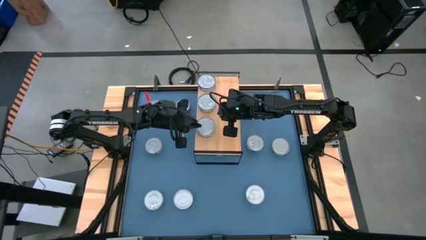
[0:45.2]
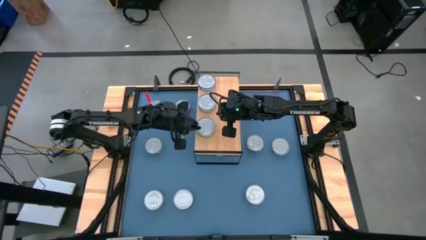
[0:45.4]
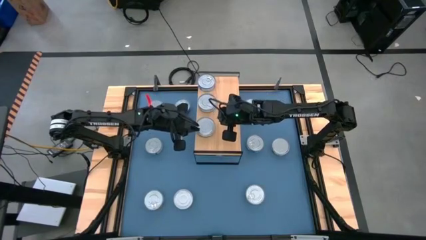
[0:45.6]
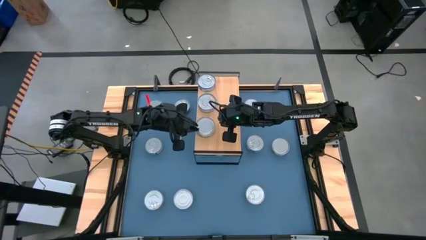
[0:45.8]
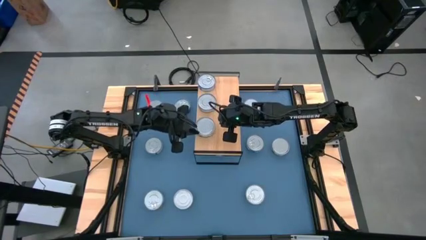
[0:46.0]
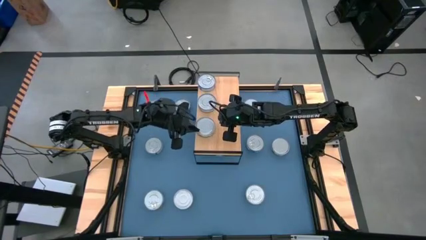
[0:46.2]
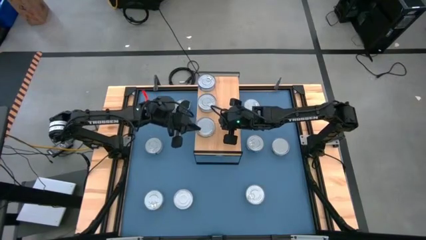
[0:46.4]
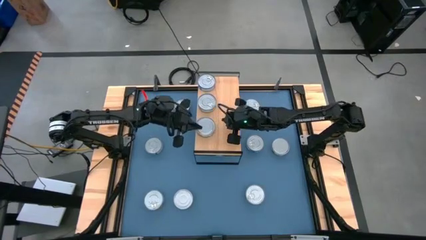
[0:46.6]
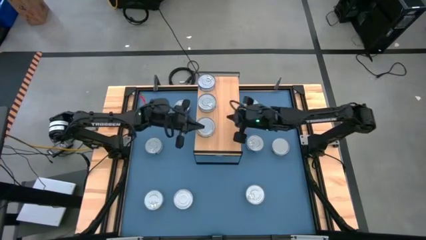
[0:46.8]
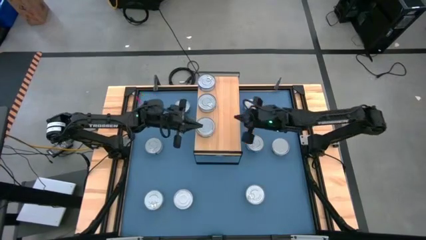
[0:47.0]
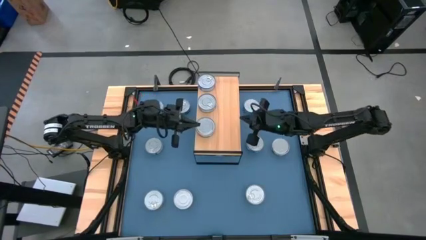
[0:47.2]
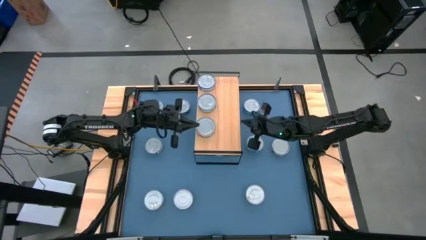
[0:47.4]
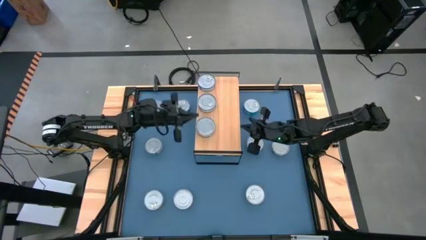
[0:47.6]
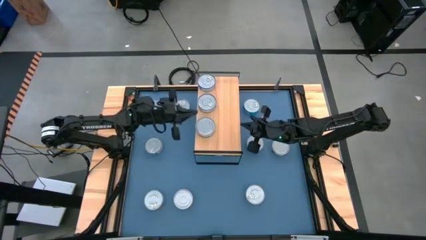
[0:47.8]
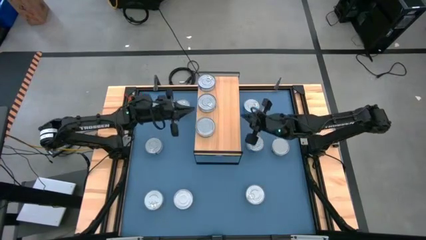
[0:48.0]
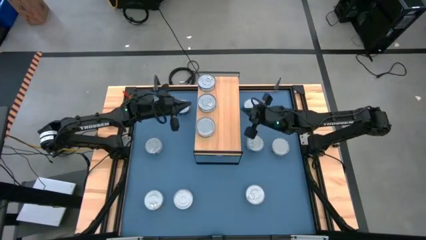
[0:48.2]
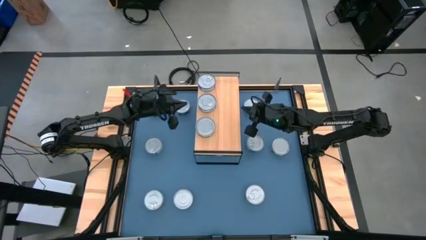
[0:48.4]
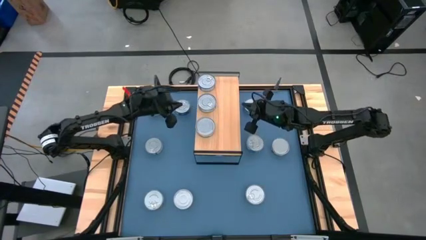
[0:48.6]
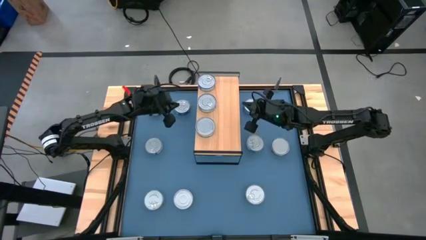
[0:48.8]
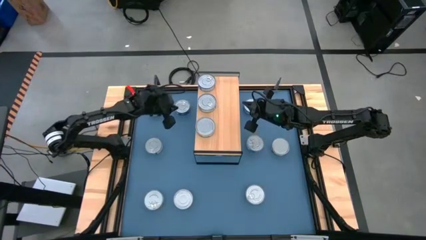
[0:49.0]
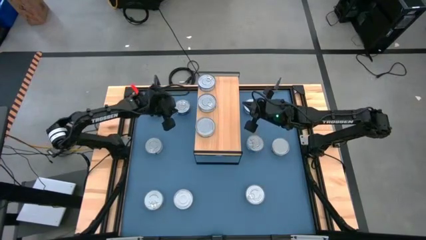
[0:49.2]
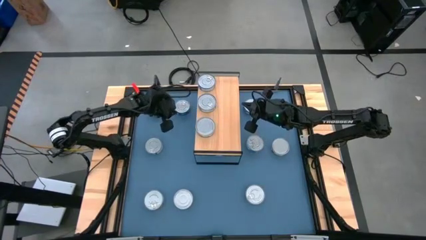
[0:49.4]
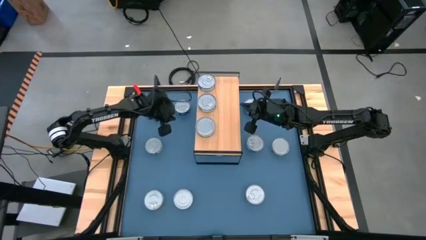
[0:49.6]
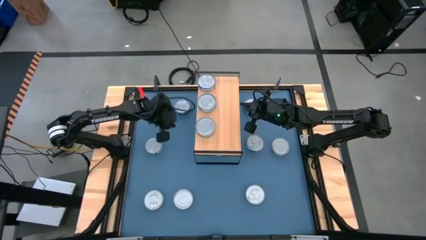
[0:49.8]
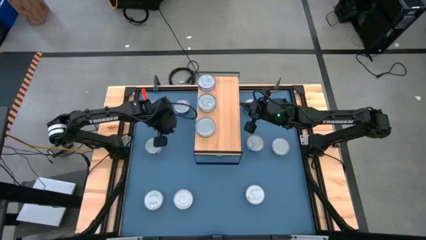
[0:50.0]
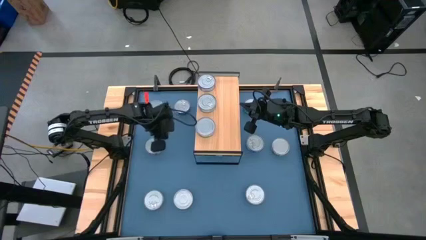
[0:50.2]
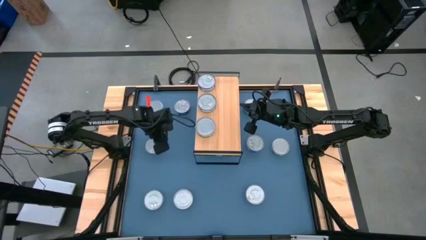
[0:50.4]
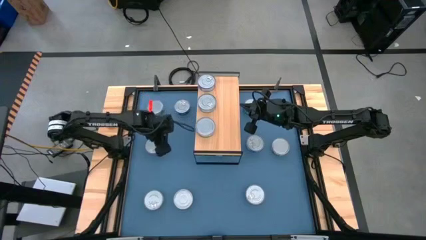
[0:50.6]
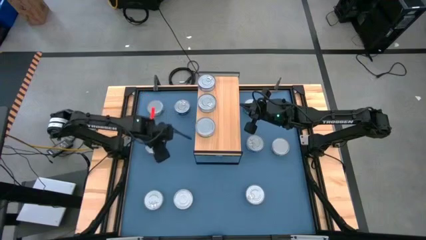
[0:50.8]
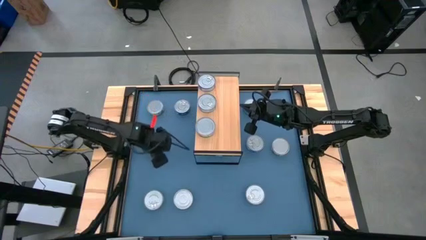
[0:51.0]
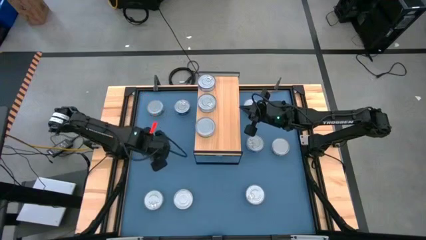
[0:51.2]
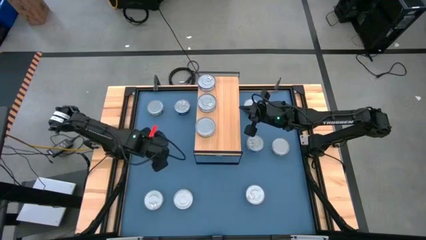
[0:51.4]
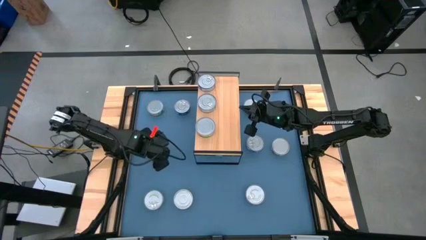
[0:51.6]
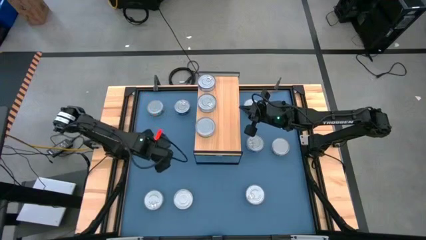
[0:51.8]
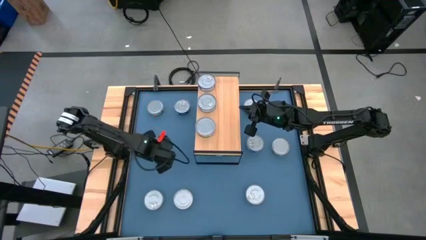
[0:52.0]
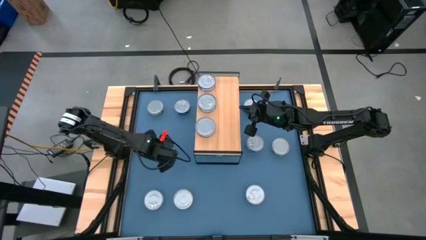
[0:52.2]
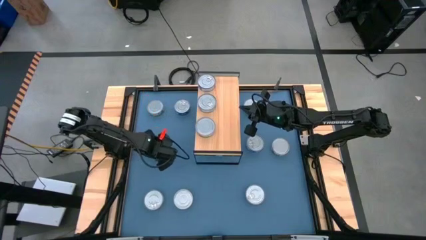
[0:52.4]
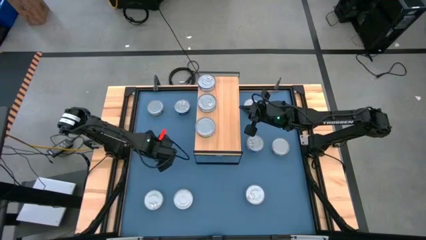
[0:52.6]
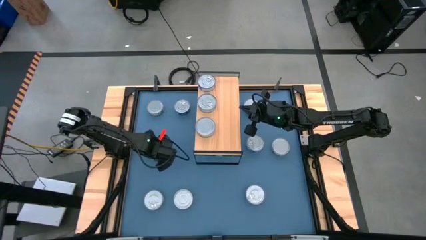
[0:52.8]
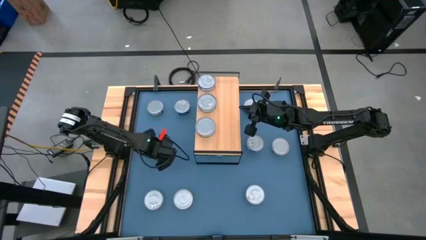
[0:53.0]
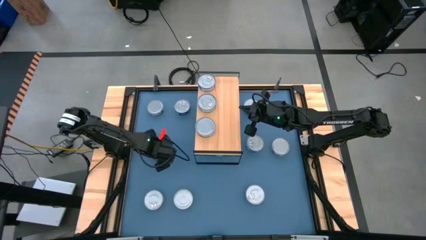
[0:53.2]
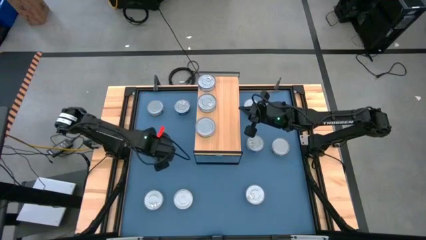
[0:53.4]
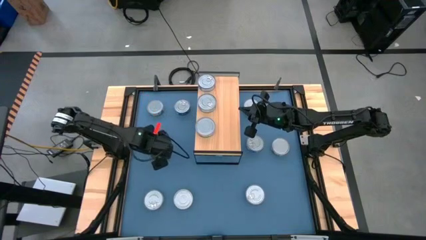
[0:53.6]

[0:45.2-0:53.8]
Task: Stack canned seafood by type on shelf
Put the blue tuna can on the shelf

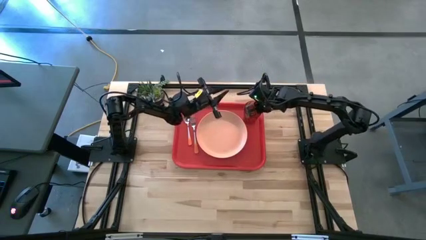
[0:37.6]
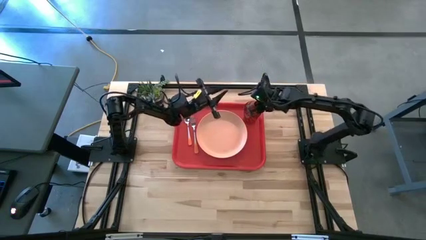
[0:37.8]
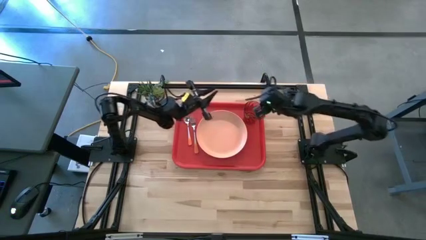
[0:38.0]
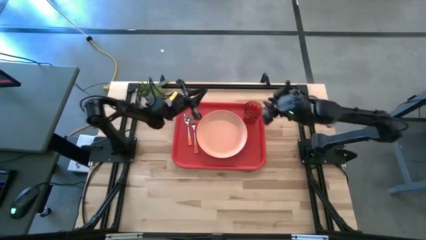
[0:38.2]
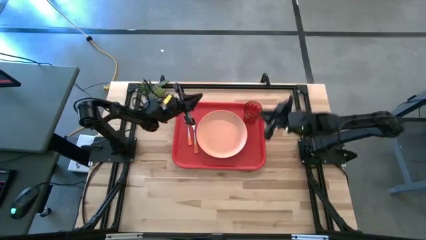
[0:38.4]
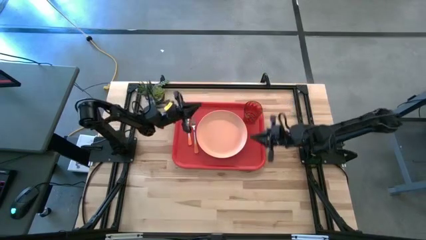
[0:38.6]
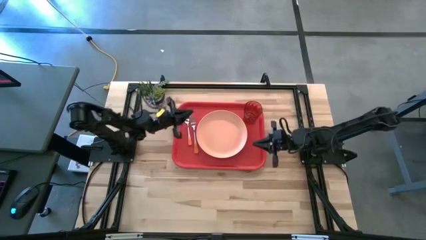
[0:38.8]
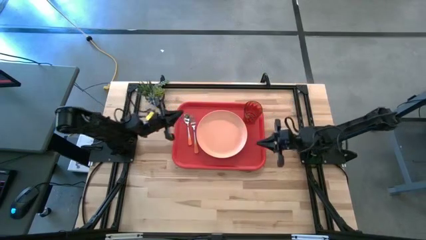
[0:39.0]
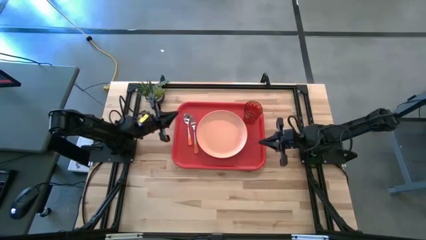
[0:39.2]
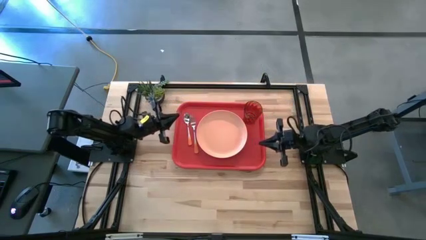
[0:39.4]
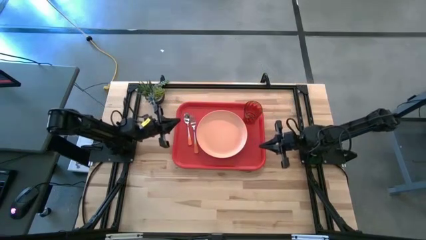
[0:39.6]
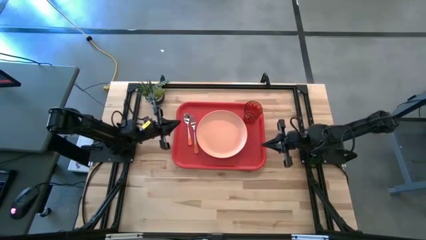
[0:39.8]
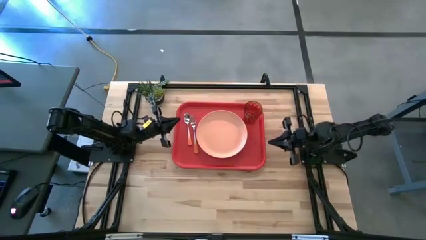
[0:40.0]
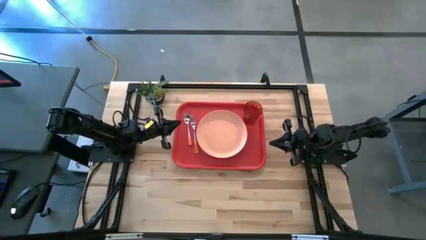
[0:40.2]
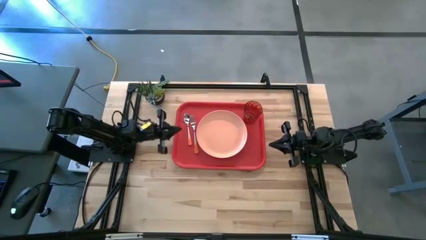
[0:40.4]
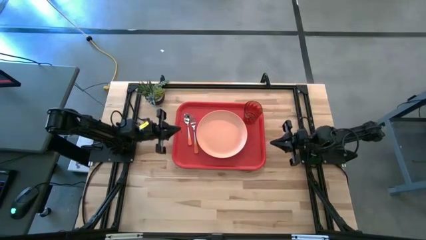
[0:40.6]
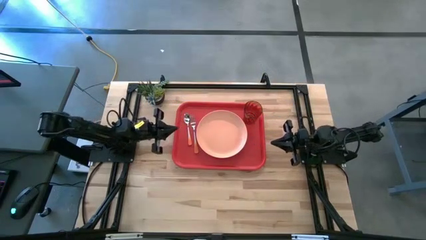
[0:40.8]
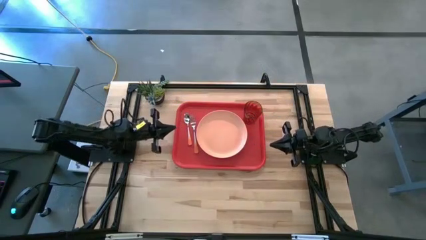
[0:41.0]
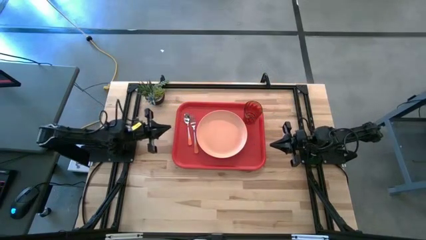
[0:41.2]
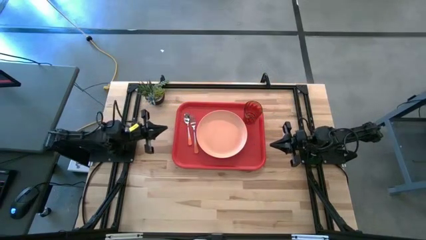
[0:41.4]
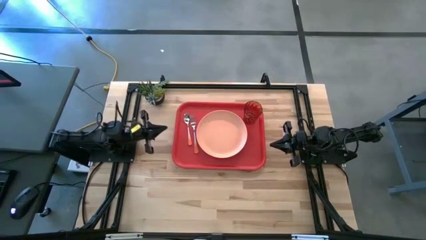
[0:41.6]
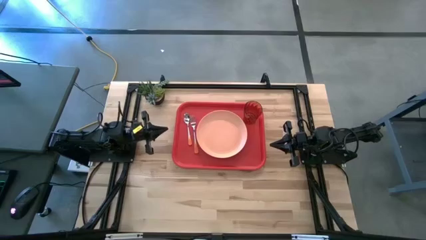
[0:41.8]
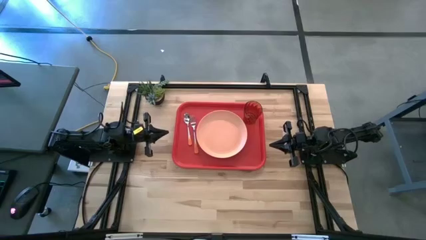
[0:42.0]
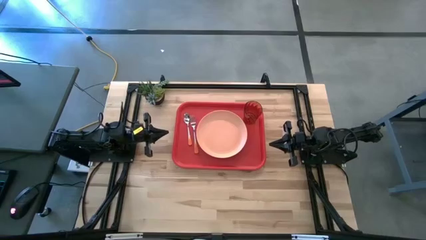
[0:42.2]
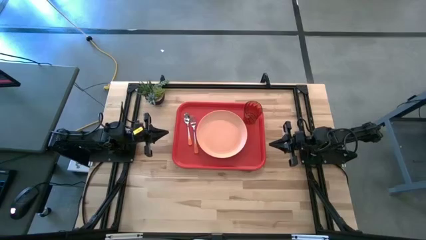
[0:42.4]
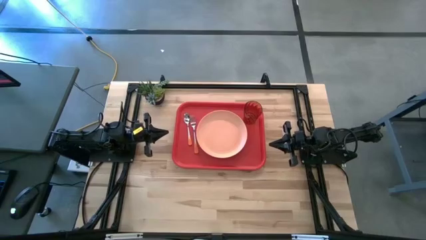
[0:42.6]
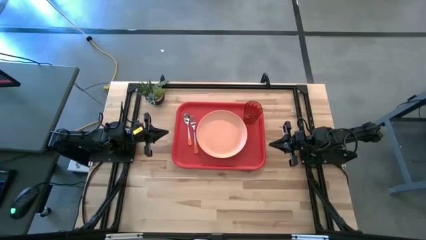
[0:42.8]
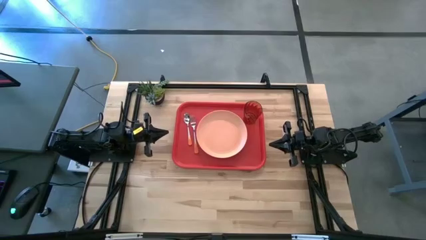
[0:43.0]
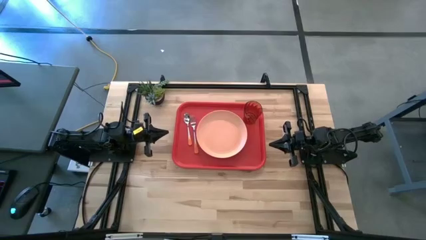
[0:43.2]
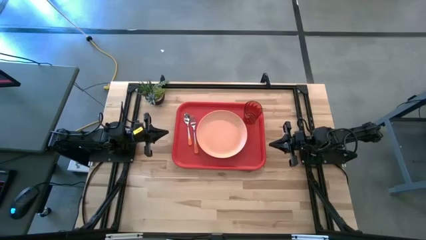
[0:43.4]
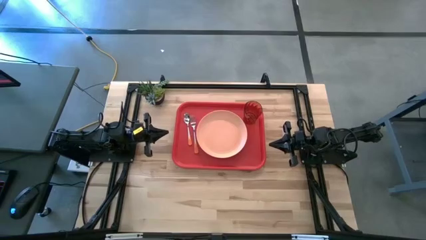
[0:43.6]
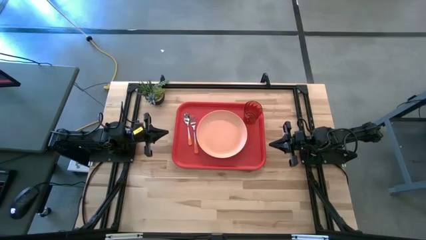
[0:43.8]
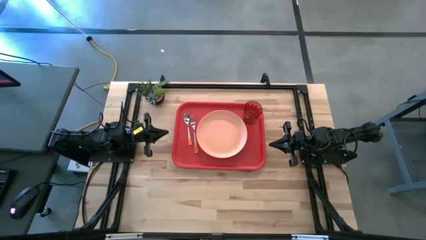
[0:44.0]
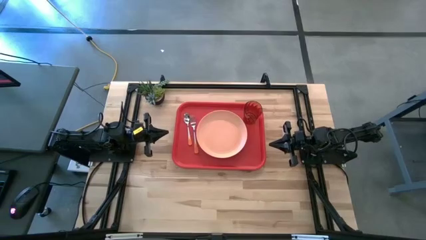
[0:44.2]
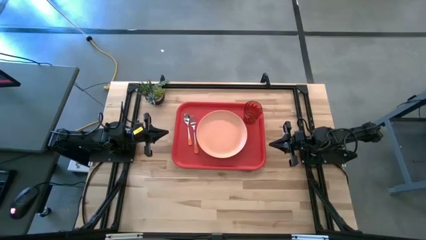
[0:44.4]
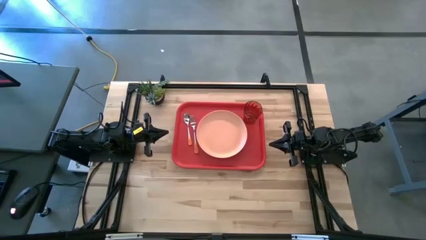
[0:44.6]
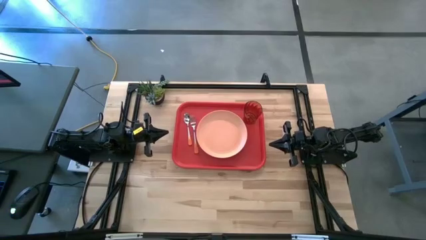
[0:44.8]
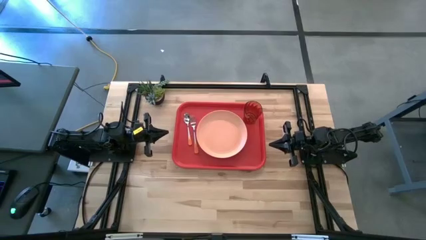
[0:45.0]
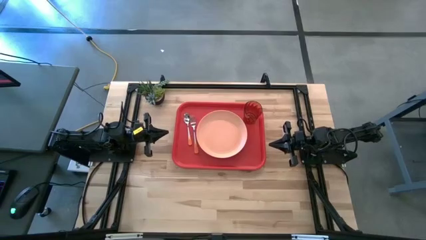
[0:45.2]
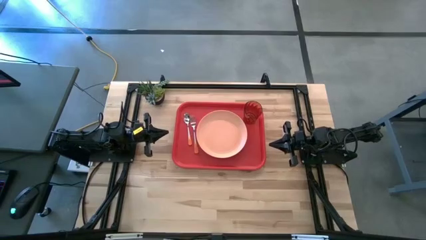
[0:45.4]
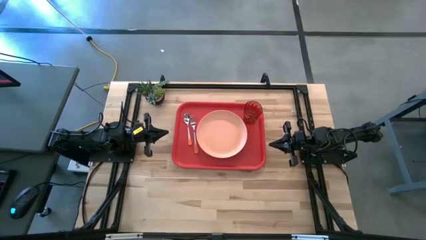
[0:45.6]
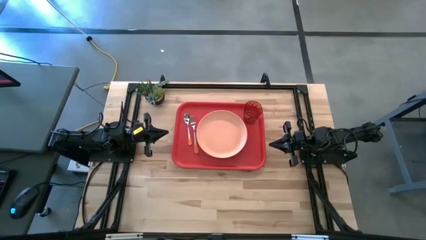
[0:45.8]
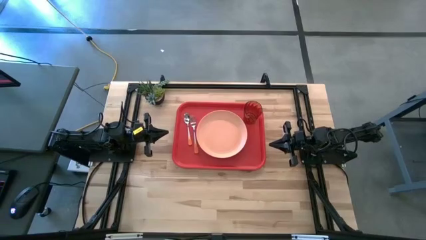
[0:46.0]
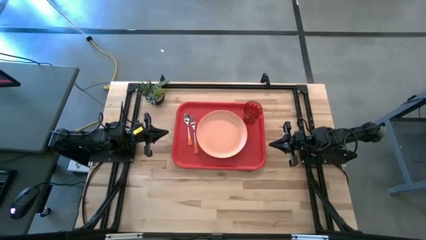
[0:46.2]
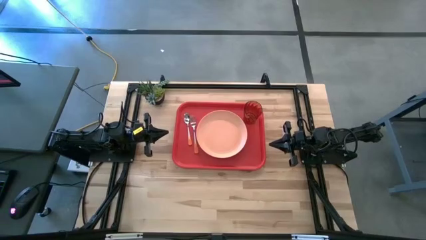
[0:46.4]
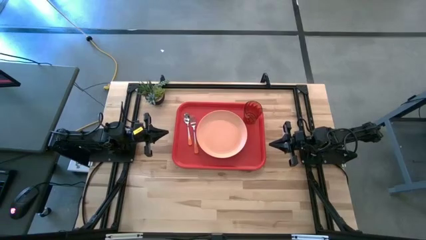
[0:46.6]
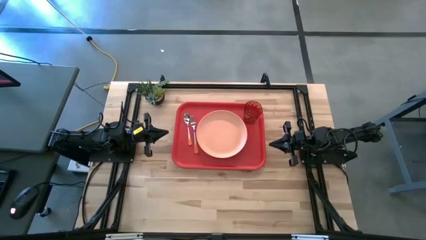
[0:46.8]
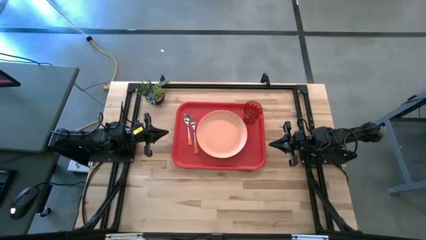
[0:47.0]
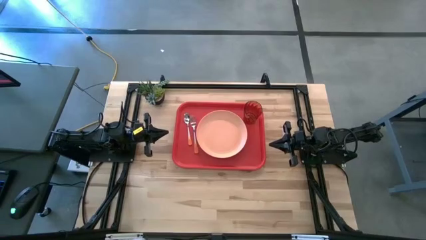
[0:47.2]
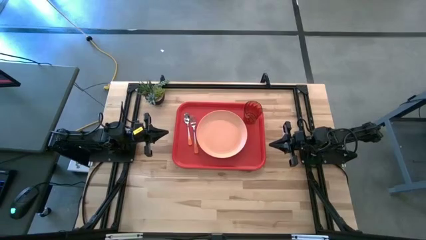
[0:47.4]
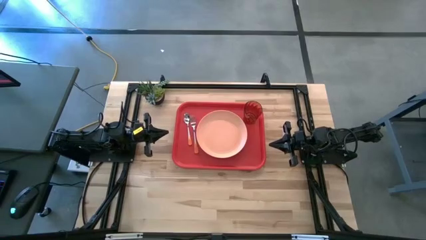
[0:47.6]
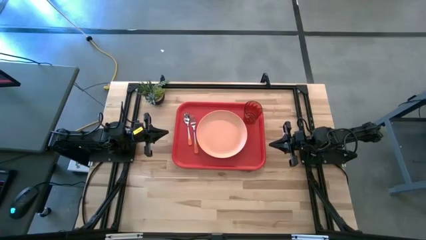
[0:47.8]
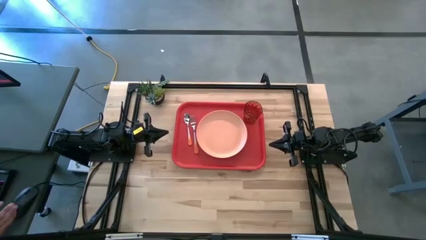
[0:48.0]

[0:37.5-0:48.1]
Task: Pick and place plate/cup/fork/spoon on tray
Return to Home Position
